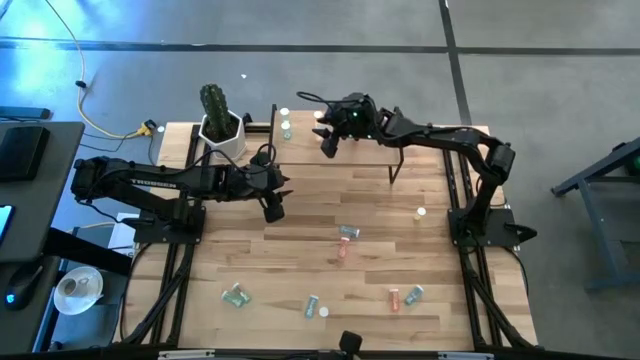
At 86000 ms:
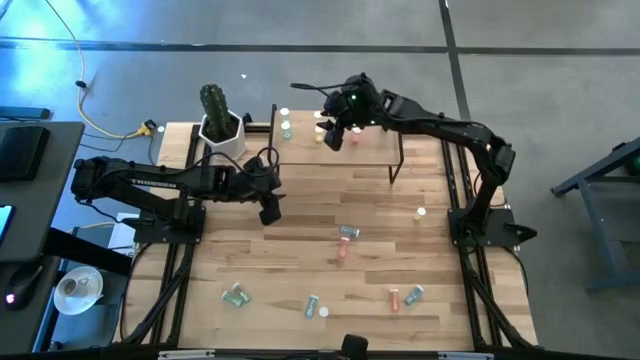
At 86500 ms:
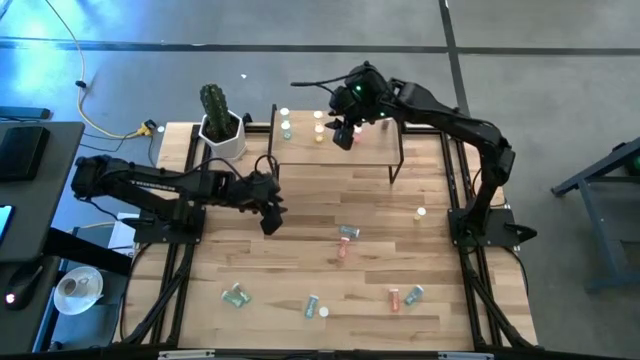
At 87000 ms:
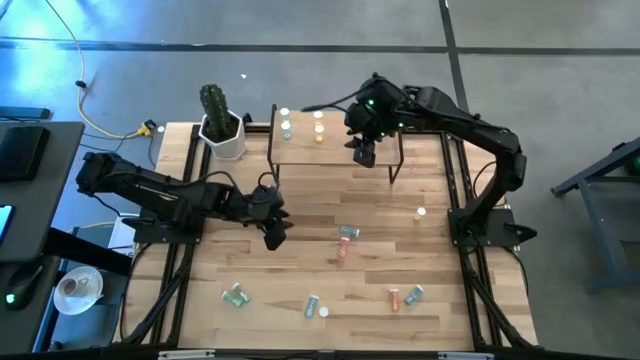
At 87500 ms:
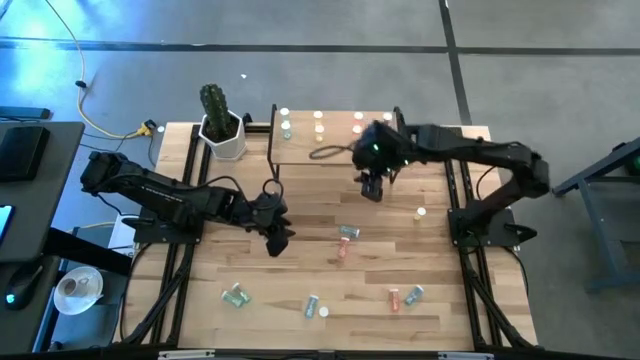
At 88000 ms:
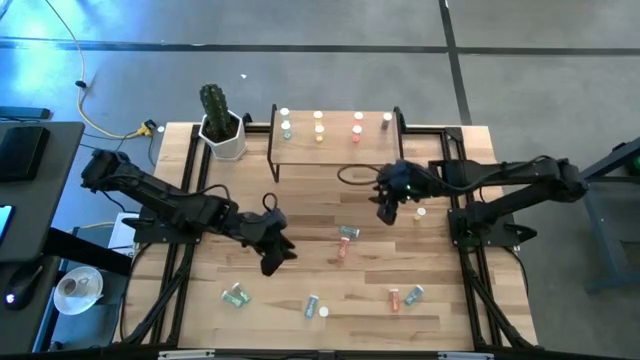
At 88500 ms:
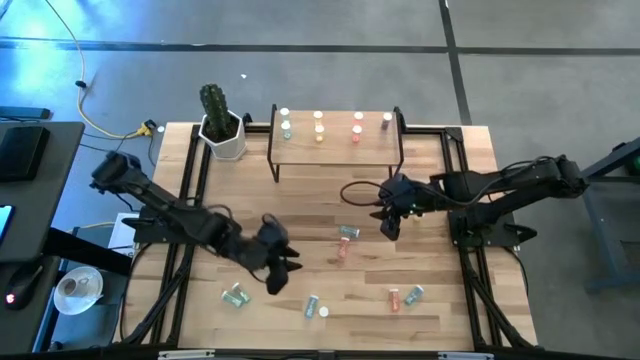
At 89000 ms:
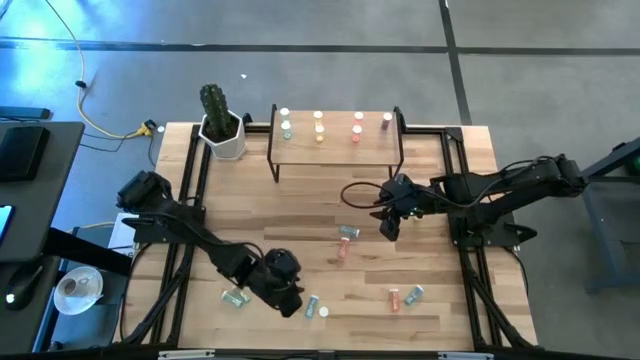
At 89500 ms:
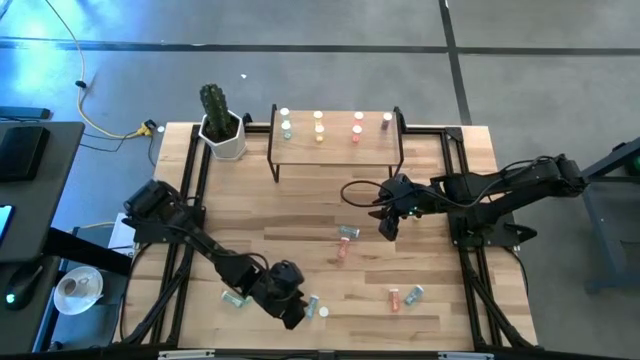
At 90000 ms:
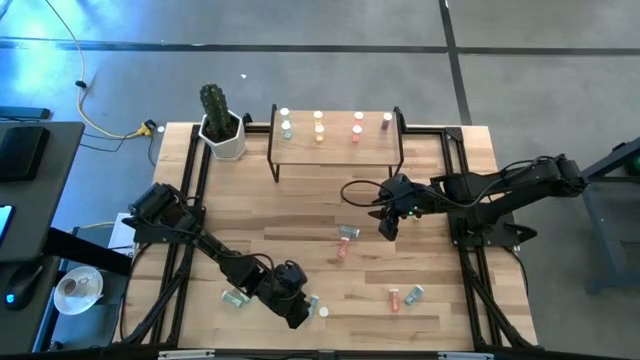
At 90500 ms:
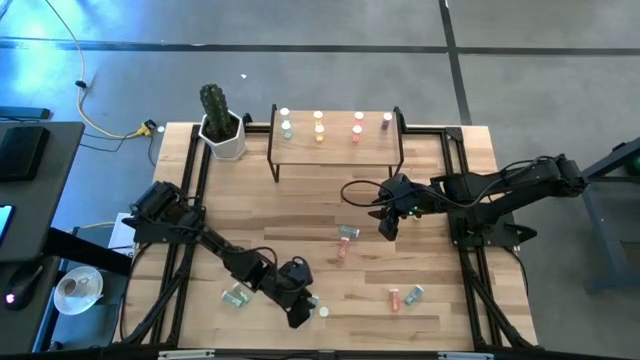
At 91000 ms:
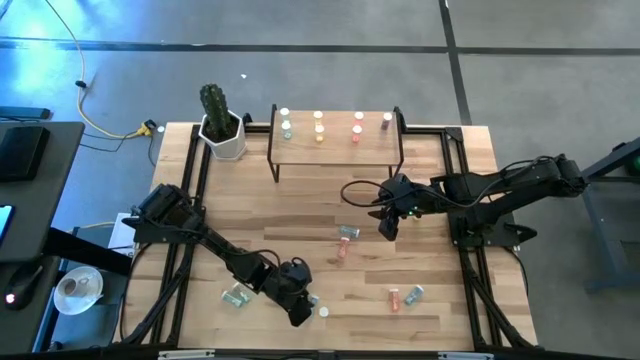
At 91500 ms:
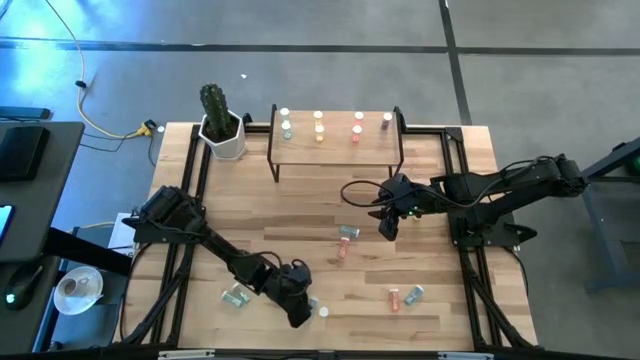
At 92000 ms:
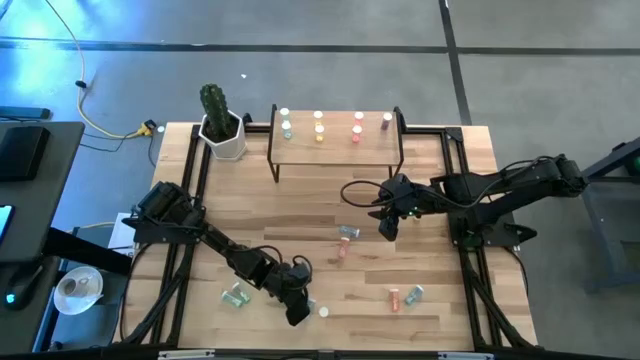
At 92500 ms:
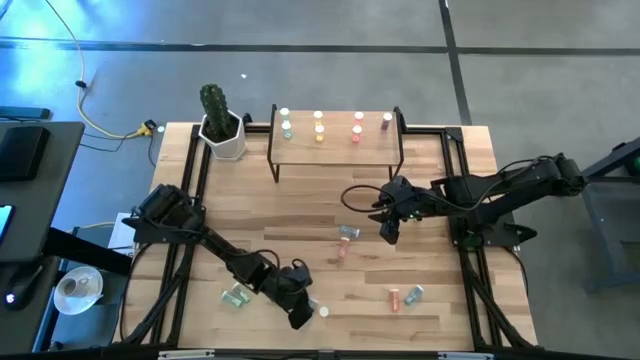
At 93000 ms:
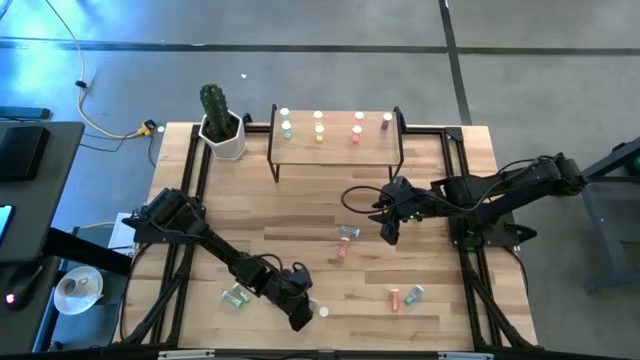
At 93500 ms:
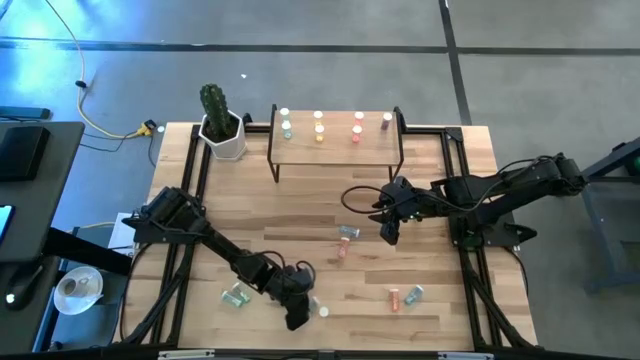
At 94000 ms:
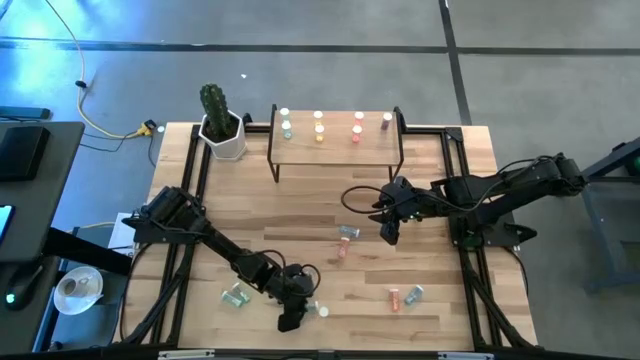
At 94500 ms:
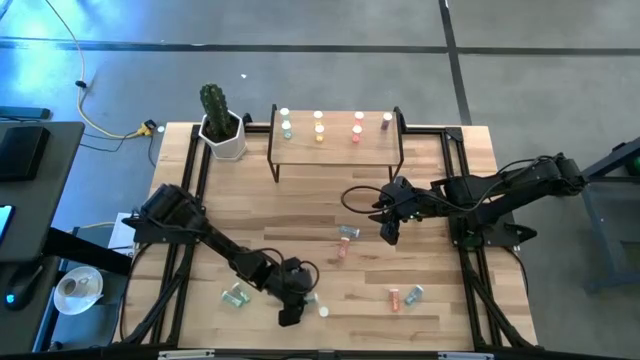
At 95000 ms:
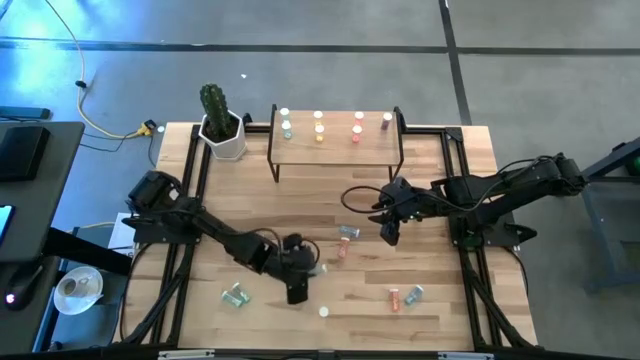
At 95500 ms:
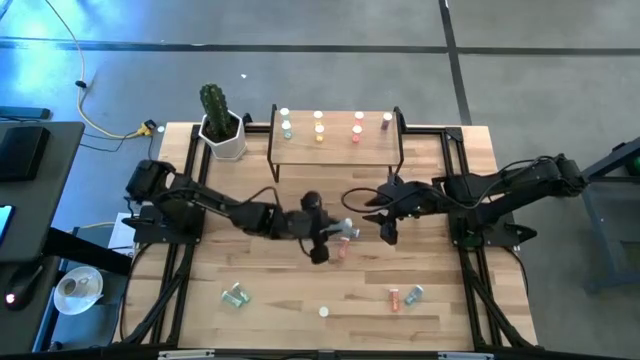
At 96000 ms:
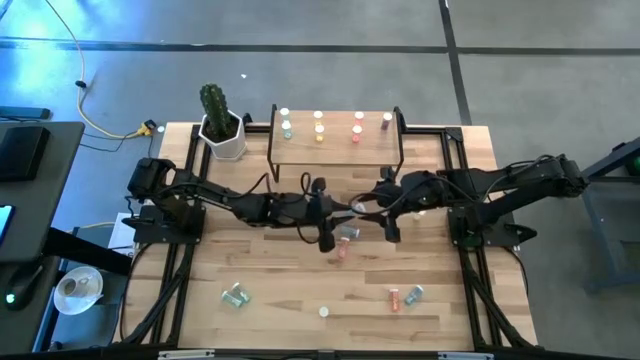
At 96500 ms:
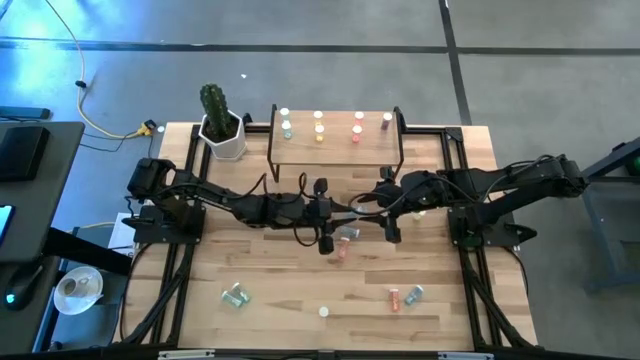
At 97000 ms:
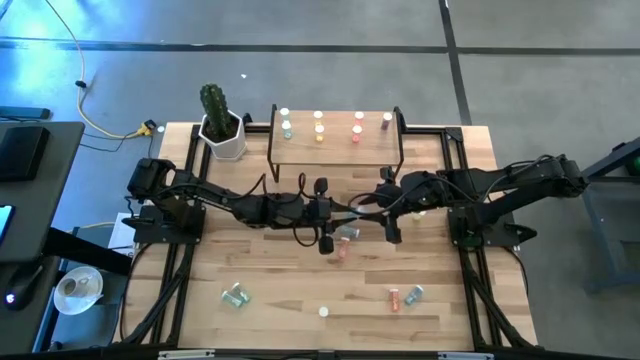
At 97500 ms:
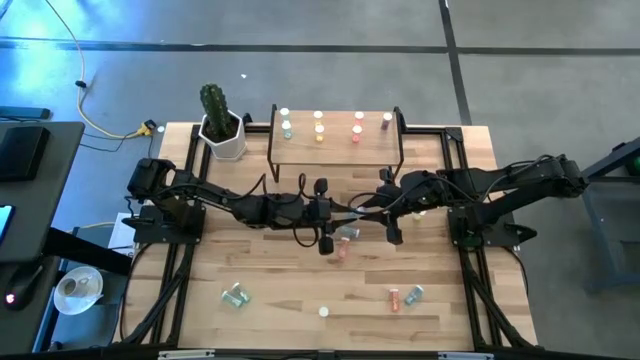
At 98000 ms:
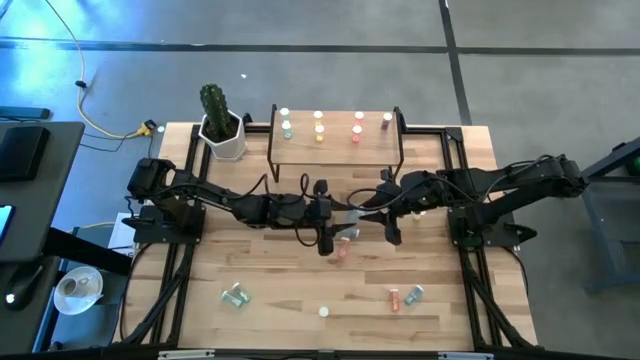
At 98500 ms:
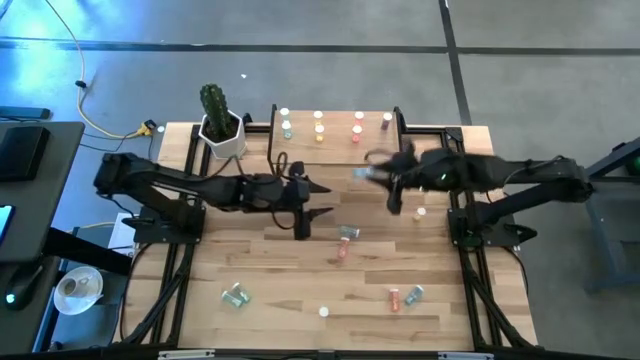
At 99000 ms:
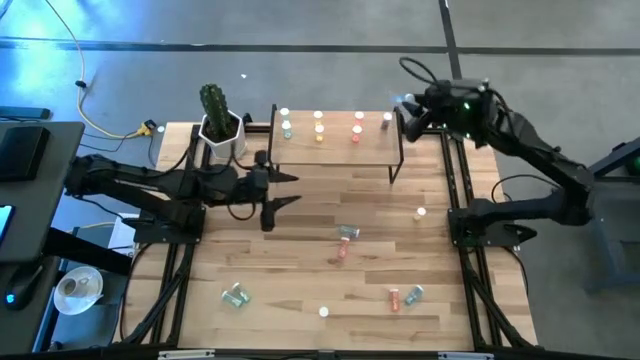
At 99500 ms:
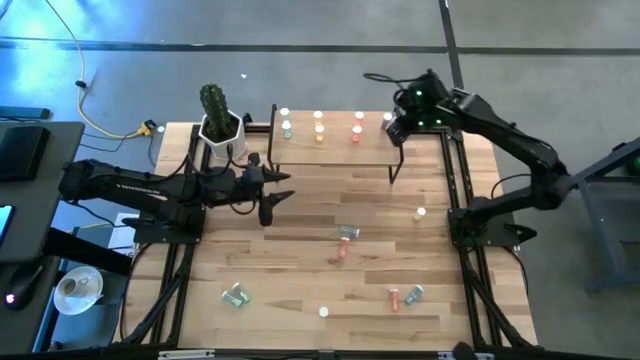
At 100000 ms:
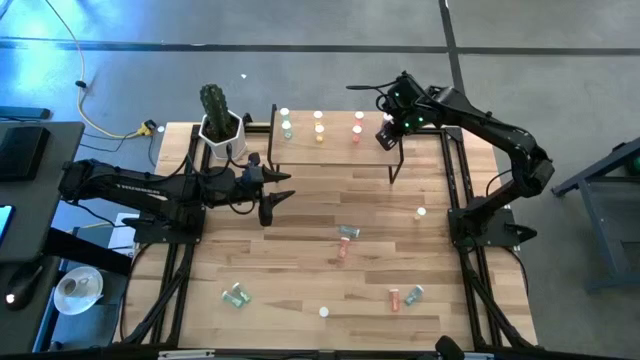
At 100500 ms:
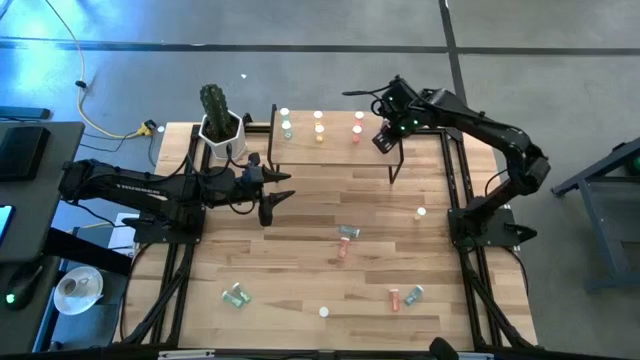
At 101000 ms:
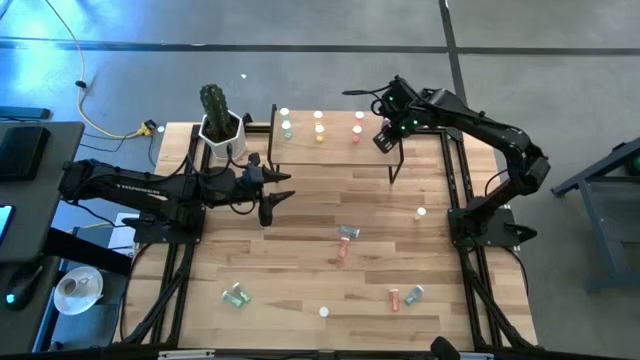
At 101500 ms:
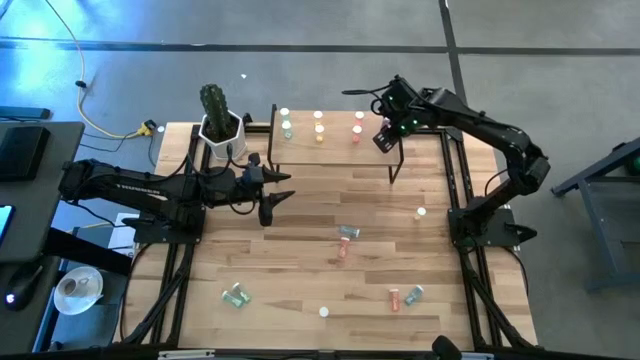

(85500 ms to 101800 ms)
Task: Pick and place medicine bottles onto shelf by color
Put the blue pill bottle on the shelf aligned with the other blue pill bottle

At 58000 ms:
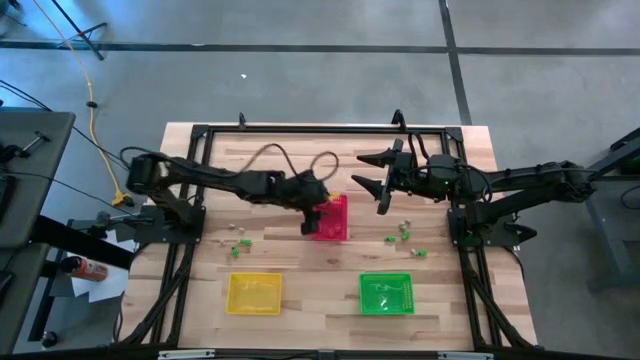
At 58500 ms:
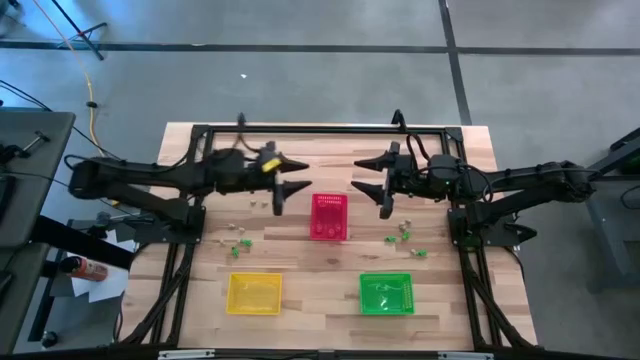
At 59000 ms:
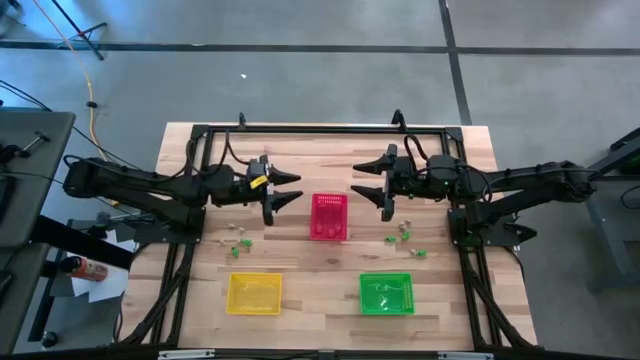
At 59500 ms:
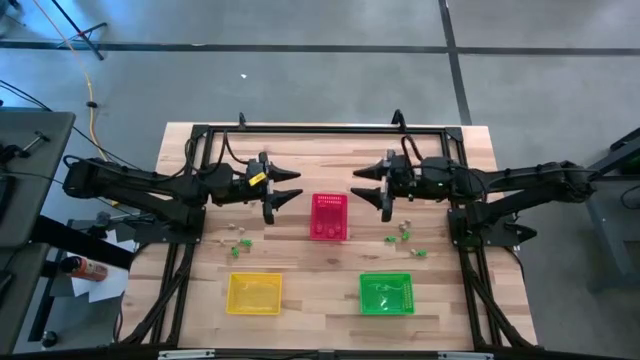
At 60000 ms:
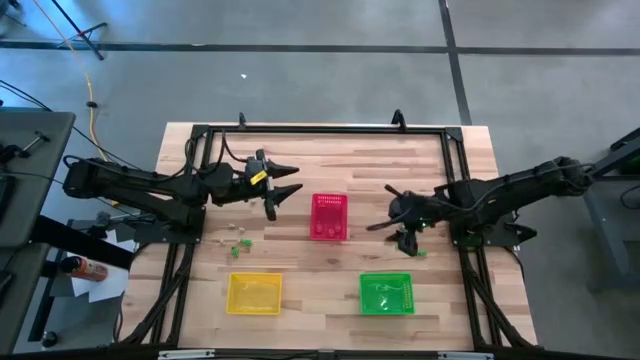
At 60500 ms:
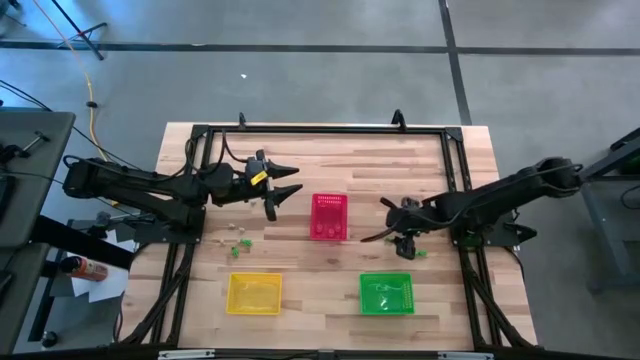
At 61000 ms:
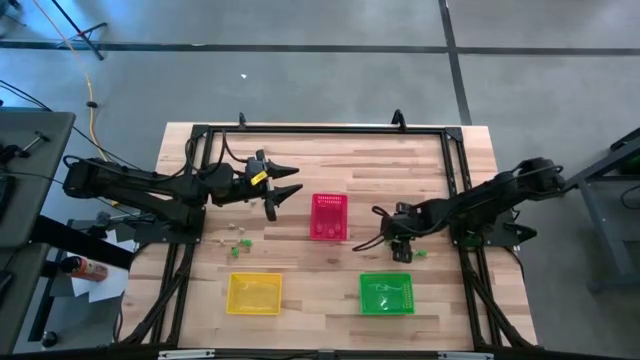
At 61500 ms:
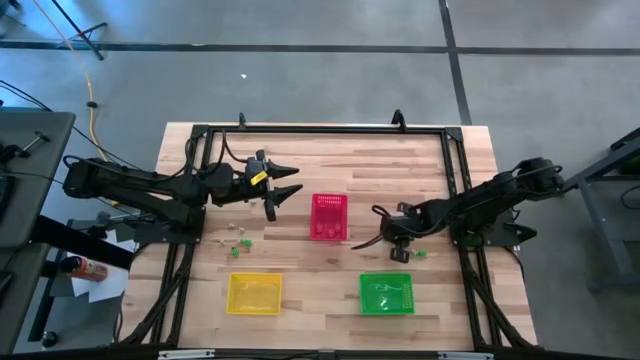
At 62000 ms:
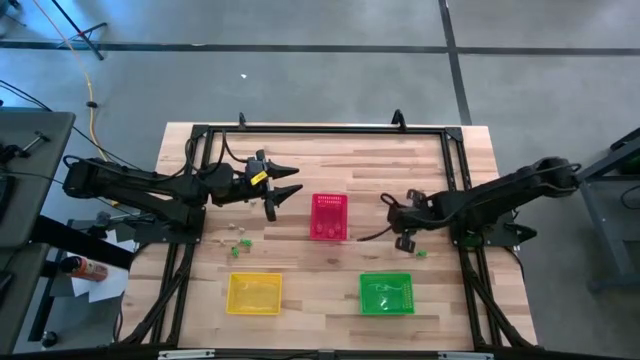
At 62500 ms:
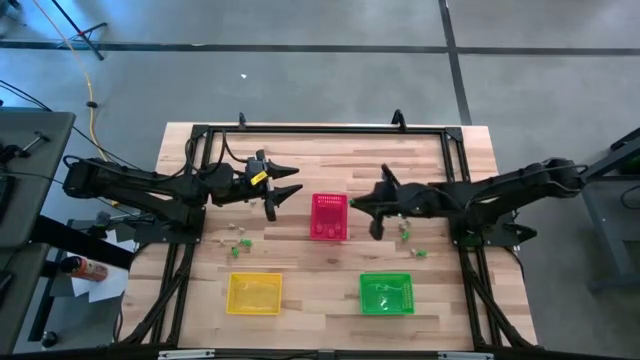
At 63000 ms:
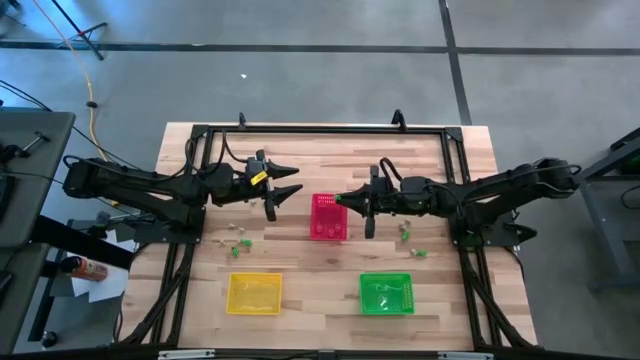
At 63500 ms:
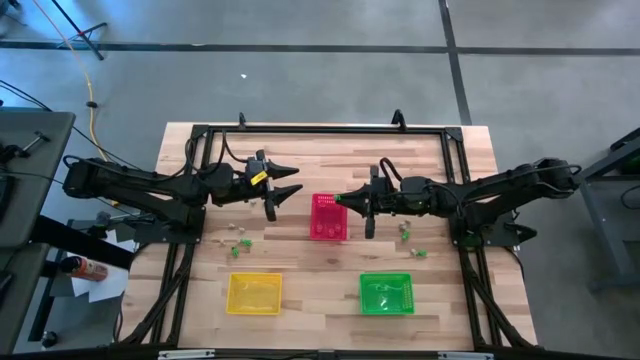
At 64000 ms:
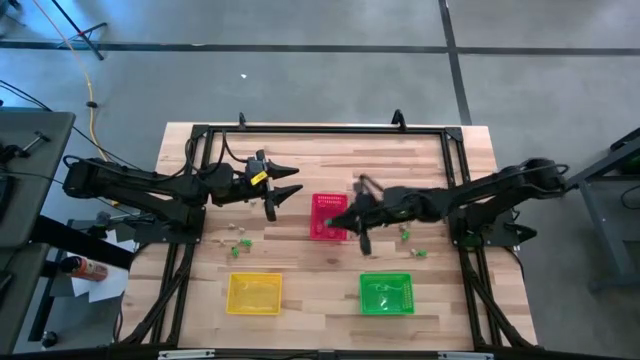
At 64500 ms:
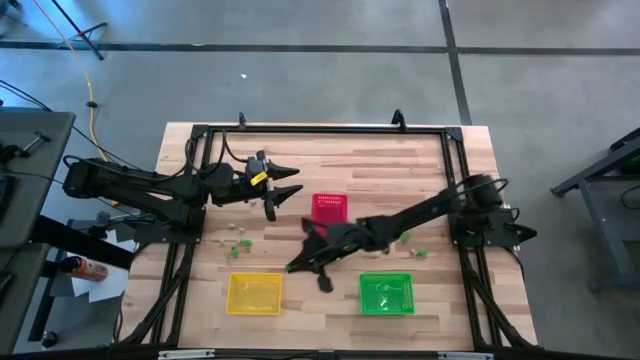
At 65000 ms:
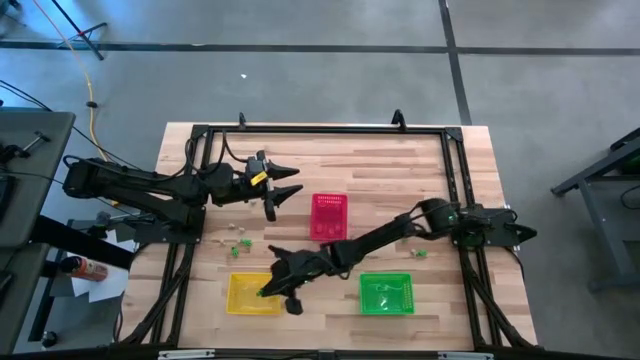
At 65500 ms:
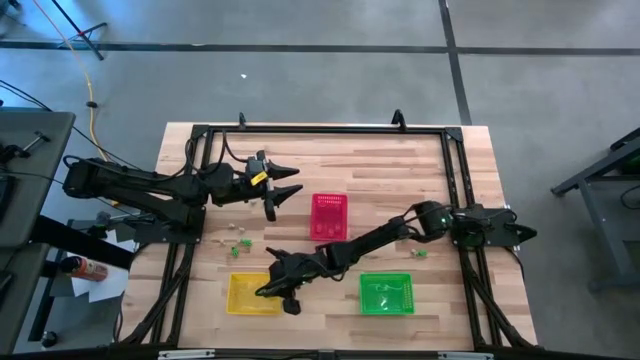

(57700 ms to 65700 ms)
Task: Sort Halloween decoration
Put the green skeleton toy into the yellow bin
